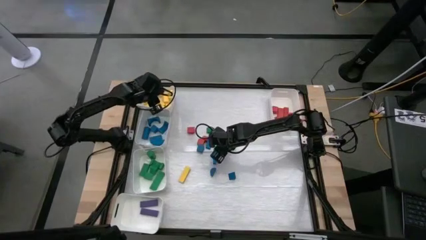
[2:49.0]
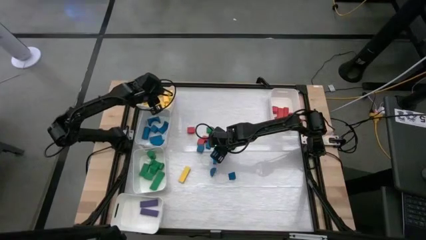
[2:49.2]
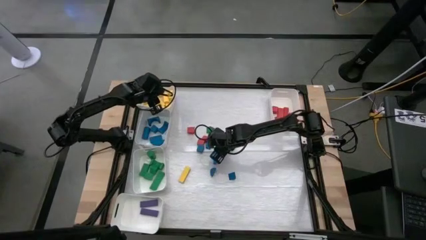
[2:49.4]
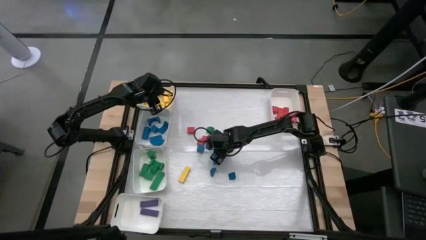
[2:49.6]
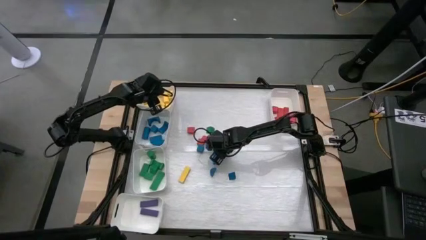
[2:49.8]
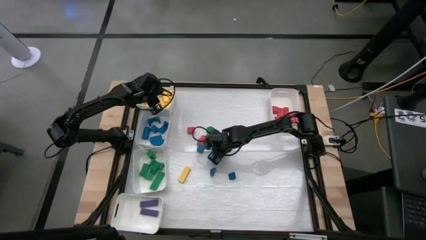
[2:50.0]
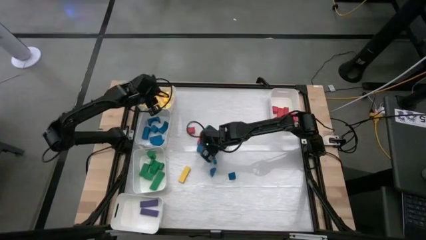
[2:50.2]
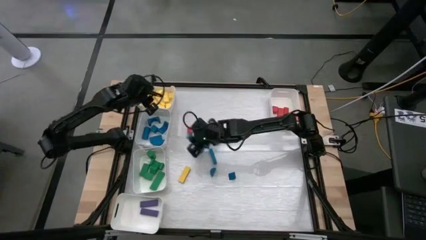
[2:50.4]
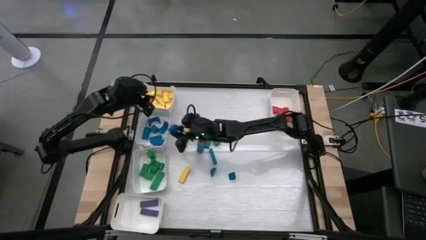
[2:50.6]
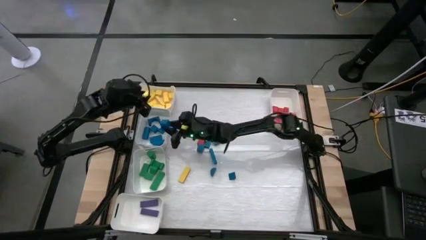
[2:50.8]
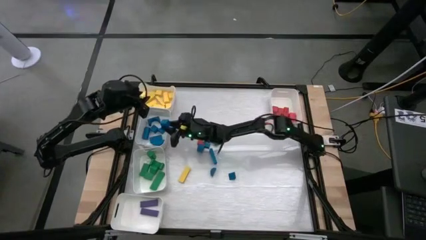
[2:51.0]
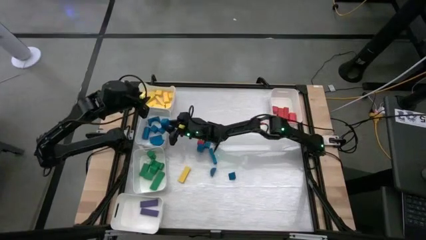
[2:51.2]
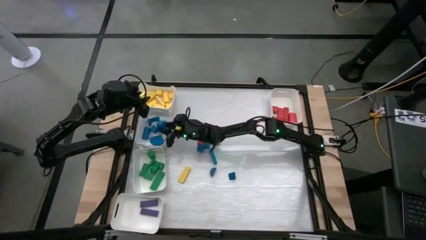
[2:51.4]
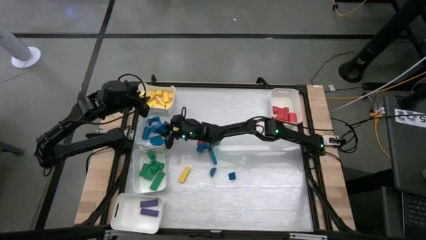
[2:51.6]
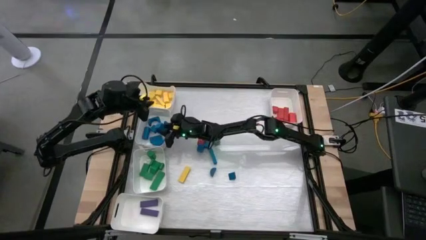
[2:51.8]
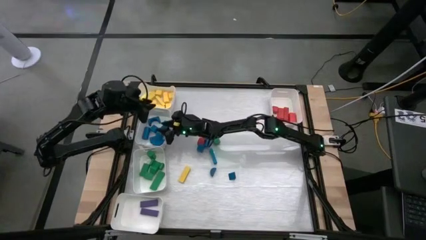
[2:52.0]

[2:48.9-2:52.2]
Task: Sort blocks
Put the blue wooden block into the top middle left white bin

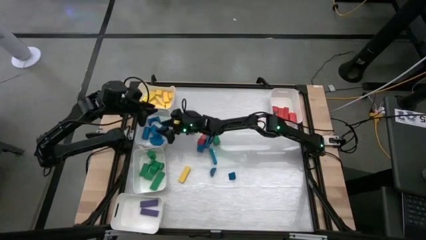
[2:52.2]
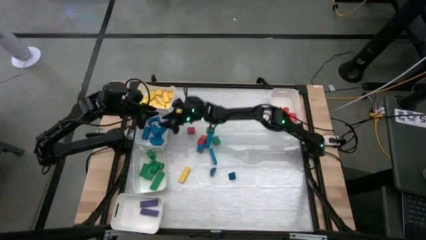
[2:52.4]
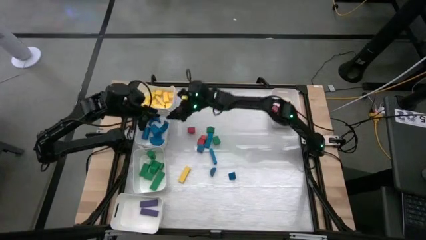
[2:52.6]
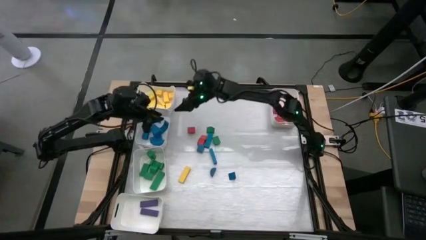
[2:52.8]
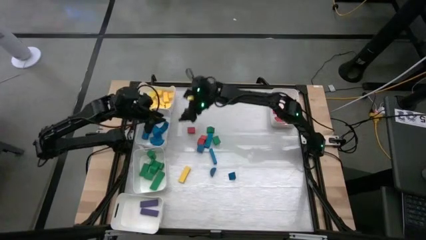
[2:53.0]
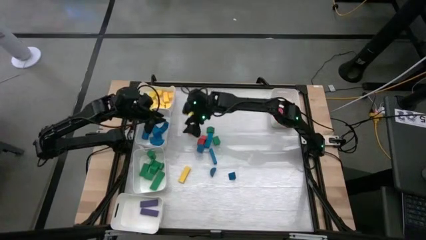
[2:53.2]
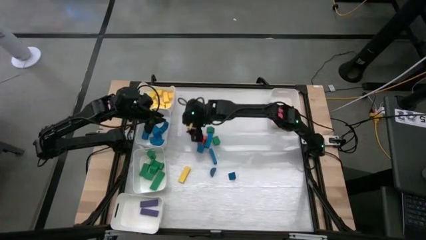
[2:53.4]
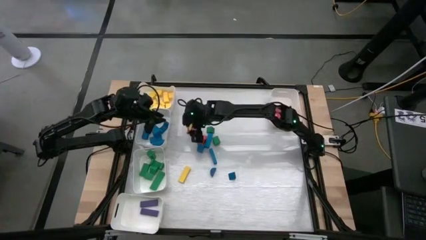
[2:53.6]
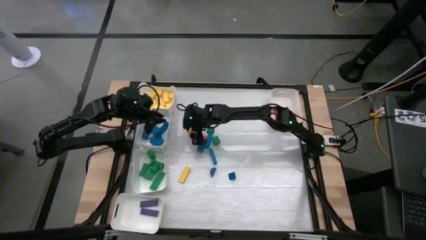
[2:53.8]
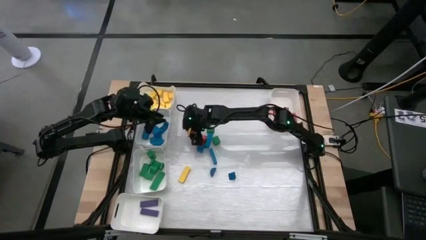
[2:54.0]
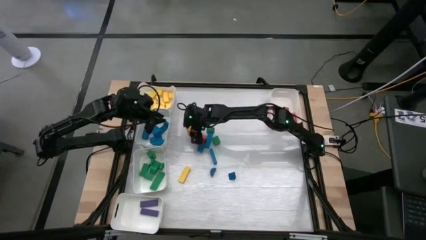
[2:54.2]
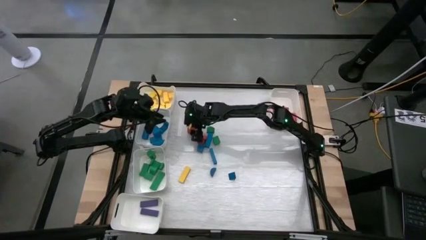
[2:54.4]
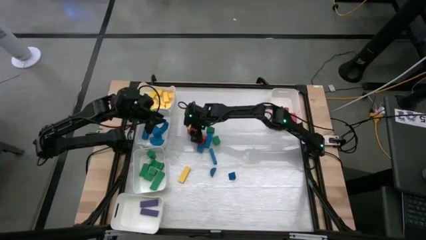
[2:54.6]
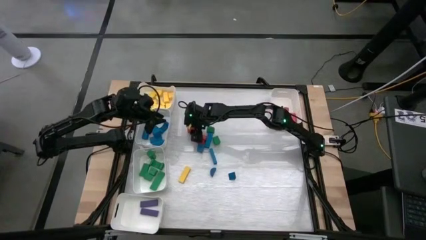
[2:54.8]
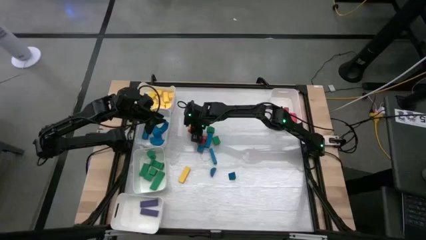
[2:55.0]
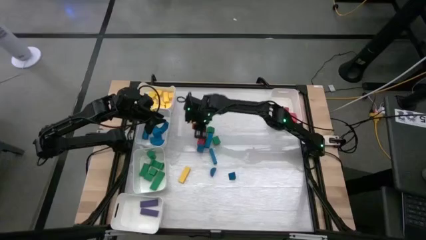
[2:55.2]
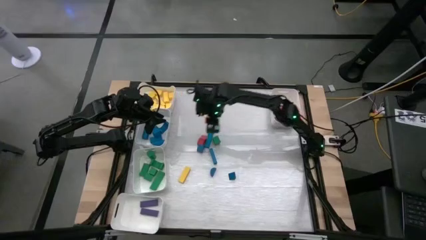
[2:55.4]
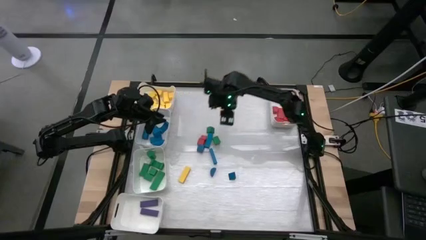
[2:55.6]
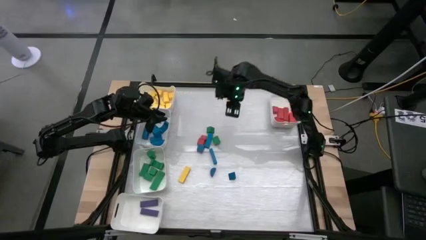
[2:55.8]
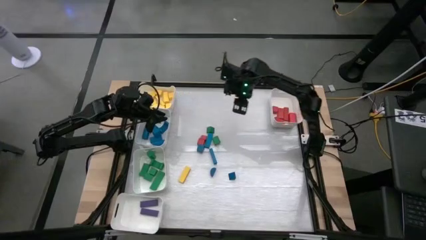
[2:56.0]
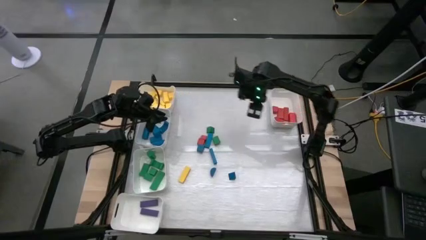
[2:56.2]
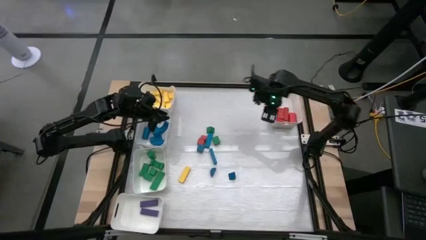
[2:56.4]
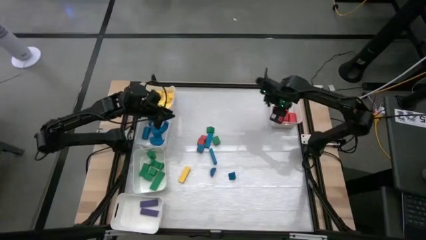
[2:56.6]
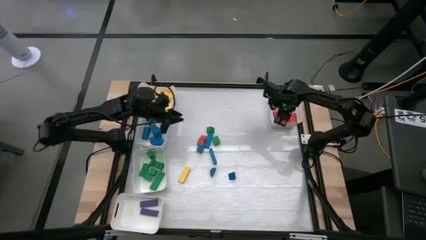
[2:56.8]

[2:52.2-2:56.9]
Put the red wooden block into the top right white bin

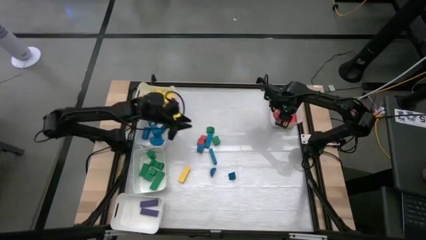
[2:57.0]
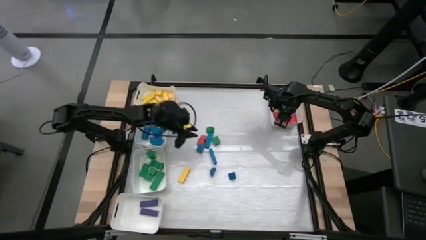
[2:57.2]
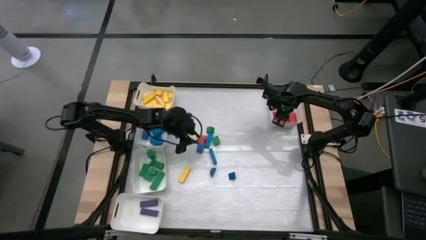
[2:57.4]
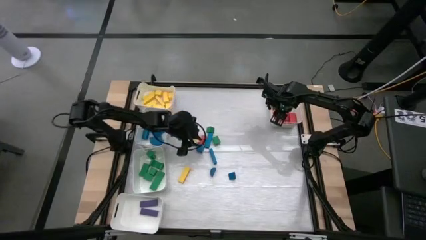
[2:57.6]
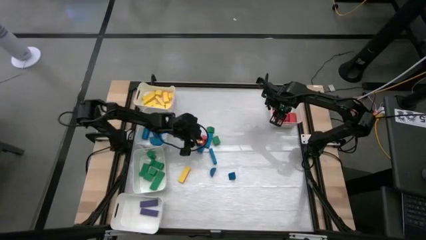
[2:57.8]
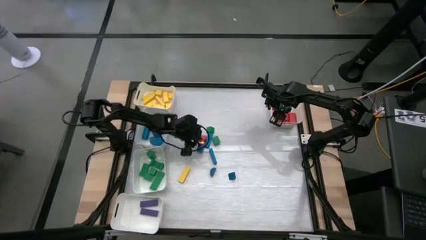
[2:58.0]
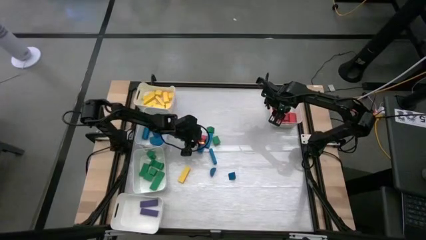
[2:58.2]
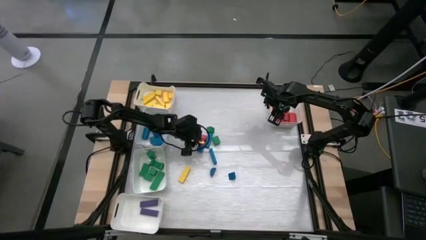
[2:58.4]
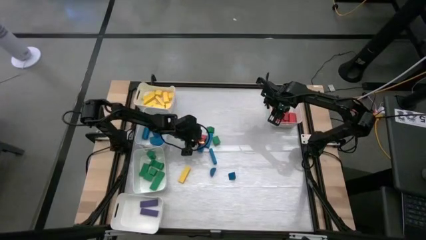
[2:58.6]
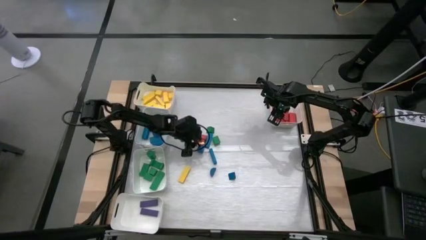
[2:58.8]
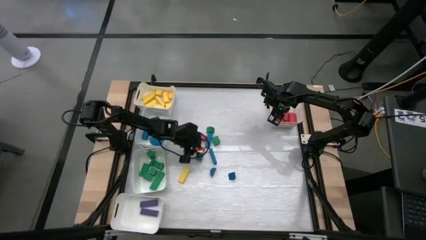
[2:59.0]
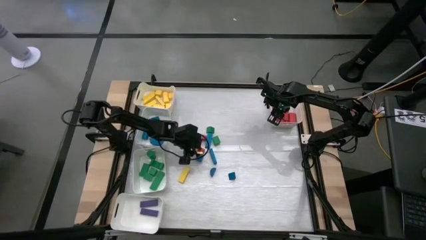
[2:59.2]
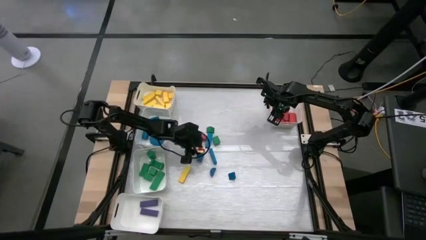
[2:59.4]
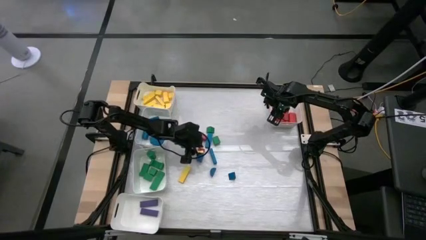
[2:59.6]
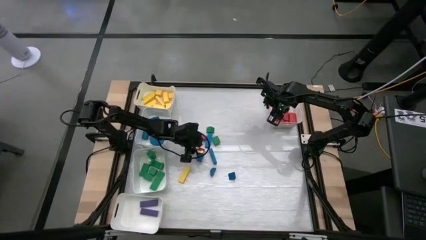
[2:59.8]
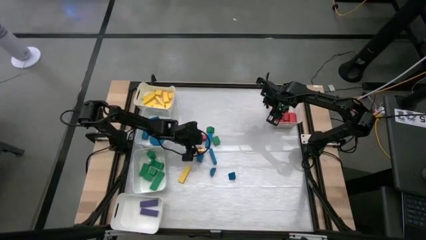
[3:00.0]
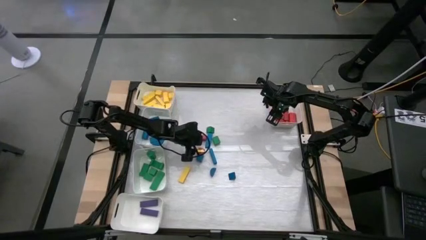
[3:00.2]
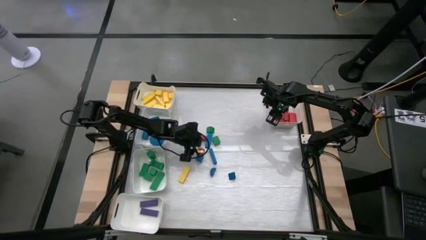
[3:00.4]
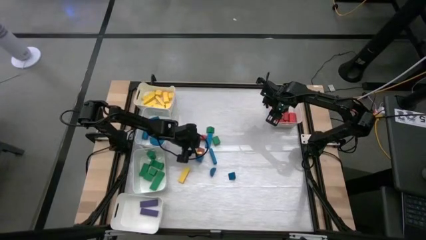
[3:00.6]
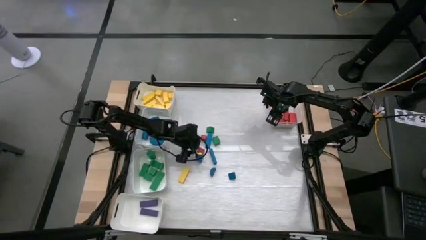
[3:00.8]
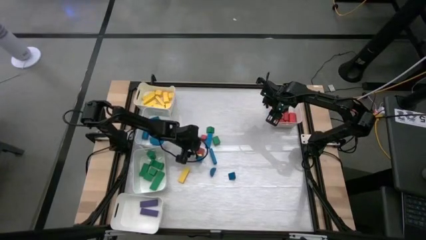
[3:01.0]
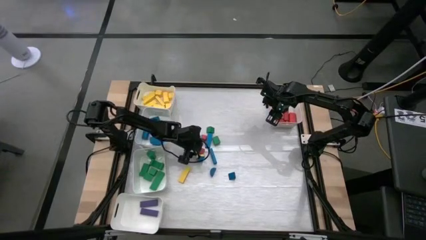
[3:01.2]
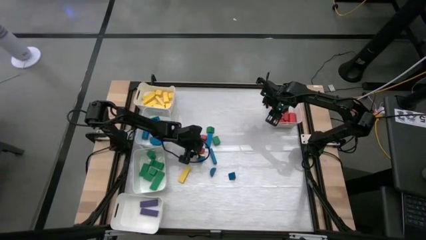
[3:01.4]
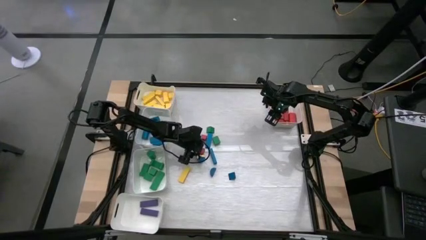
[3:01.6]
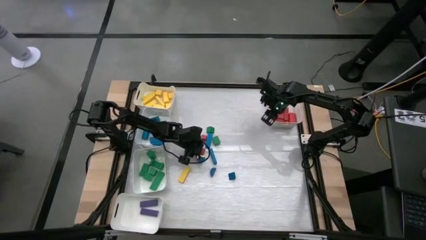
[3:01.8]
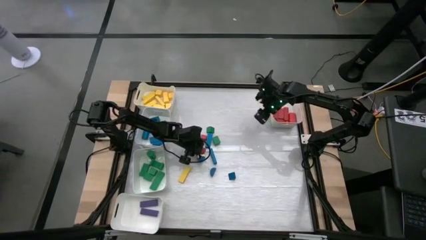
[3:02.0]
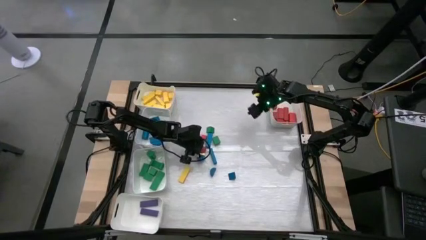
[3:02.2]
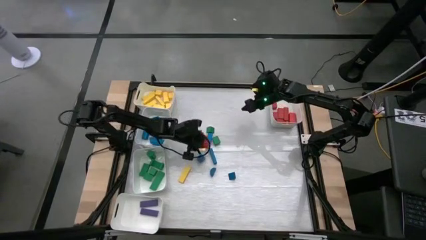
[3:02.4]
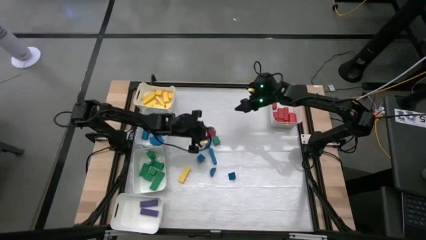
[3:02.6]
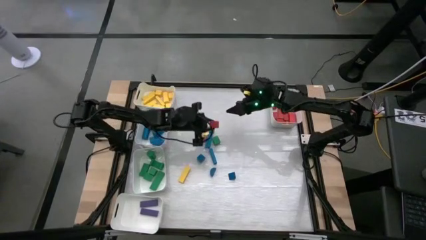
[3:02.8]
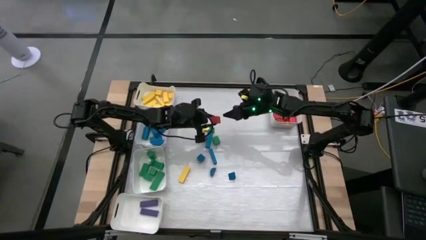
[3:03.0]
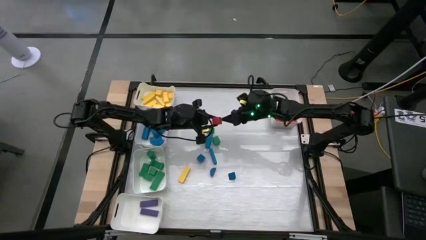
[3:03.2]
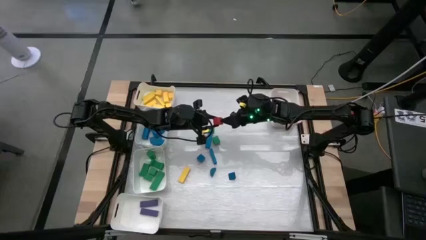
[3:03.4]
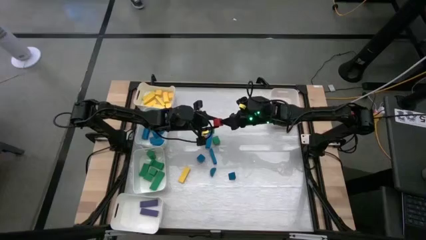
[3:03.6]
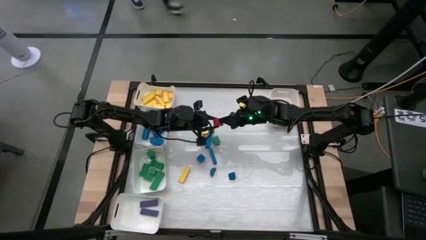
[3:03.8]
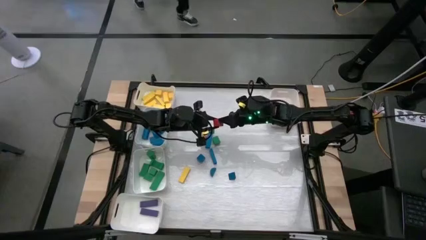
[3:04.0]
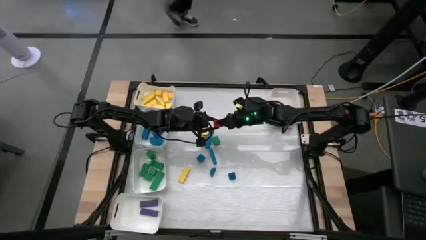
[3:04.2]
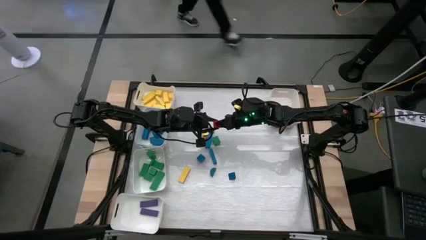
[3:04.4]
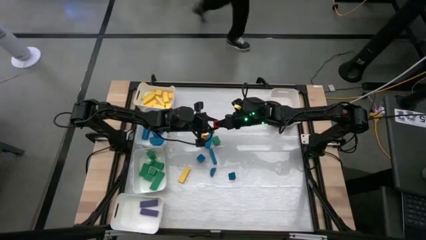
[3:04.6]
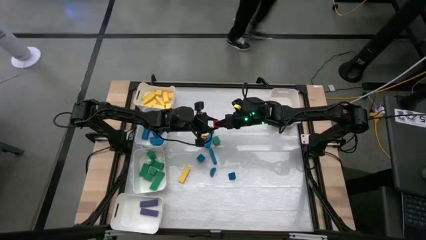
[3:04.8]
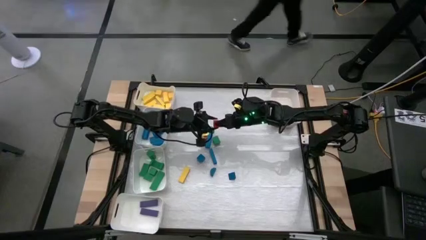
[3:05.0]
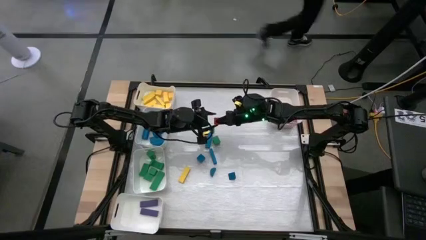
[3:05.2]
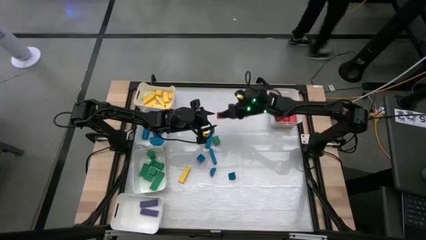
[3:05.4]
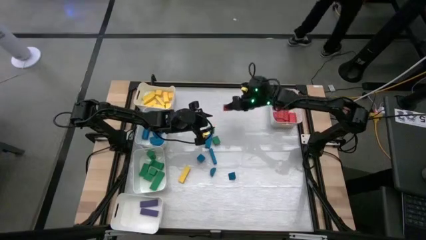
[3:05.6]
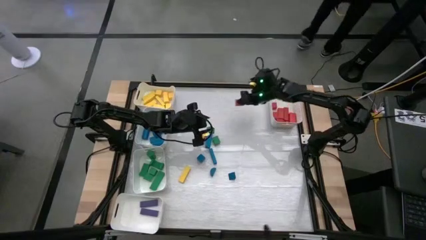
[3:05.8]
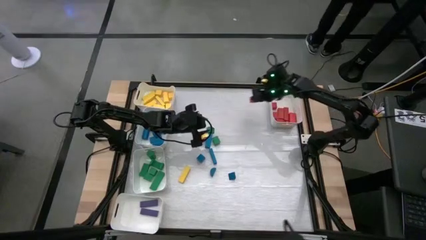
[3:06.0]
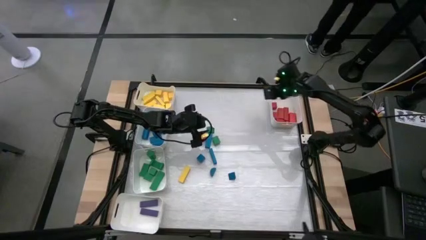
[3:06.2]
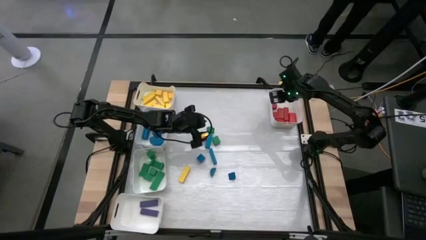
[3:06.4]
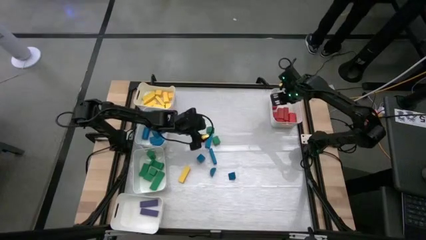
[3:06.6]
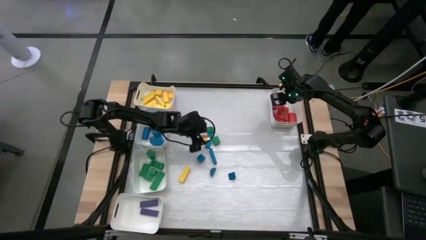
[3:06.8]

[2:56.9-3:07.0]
Put the red wooden block into the top right white bin
